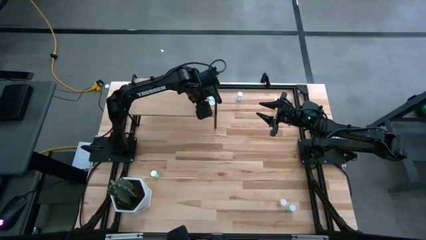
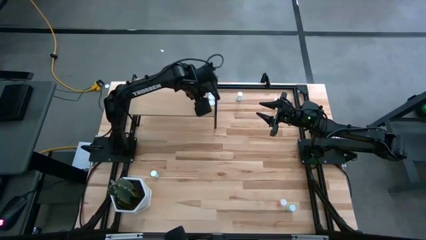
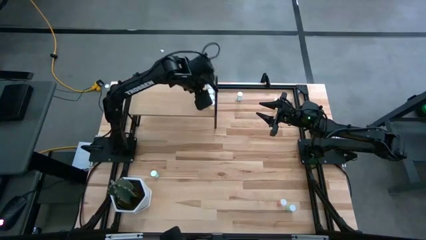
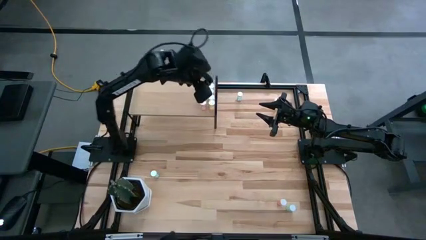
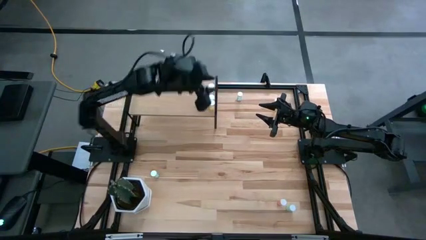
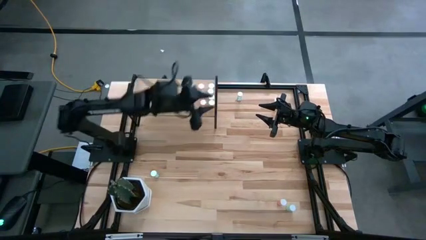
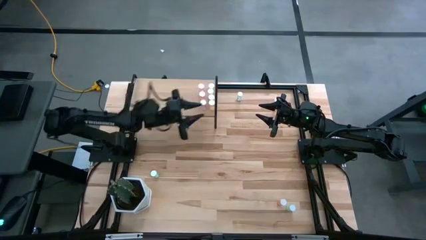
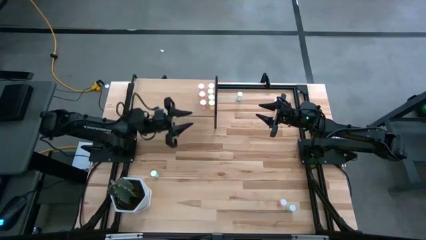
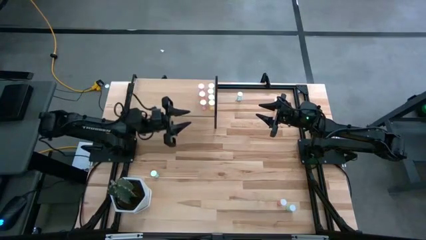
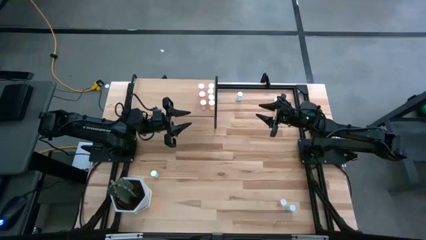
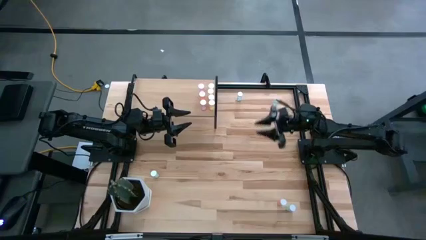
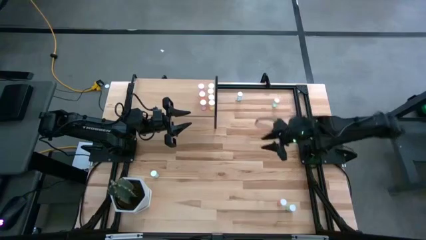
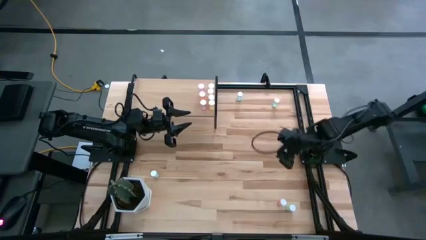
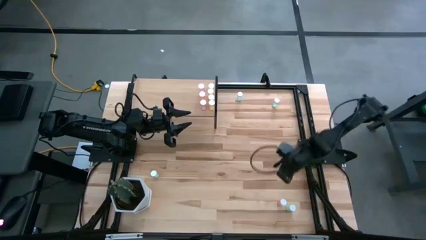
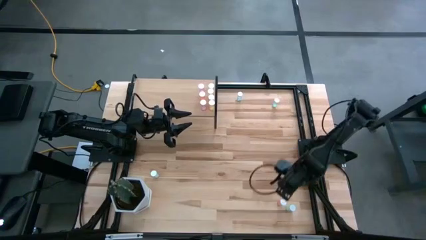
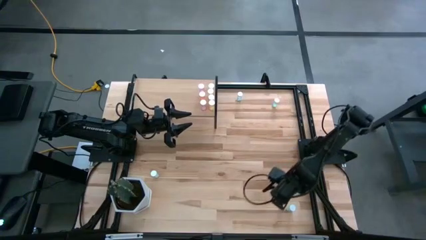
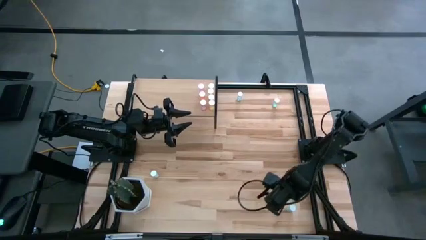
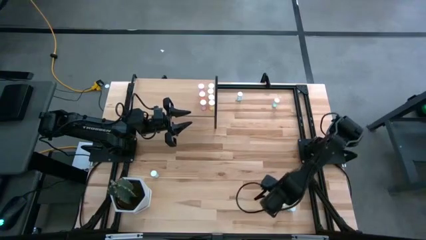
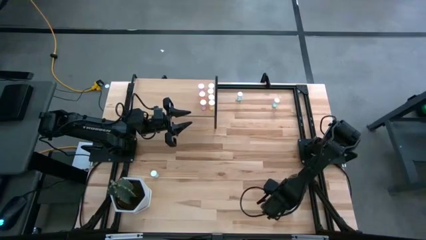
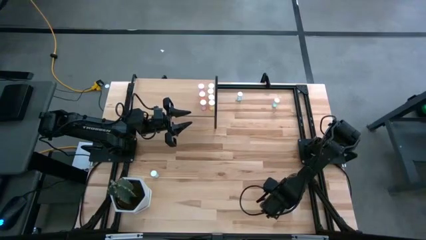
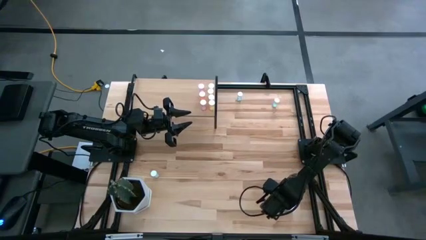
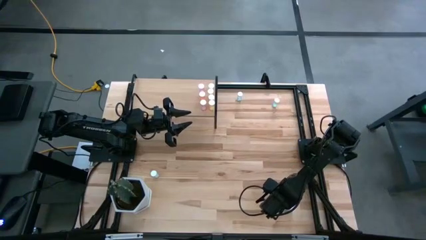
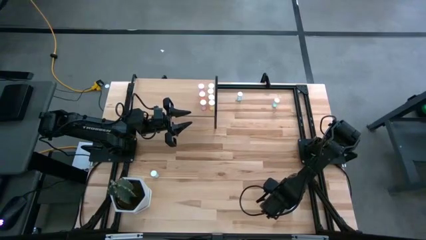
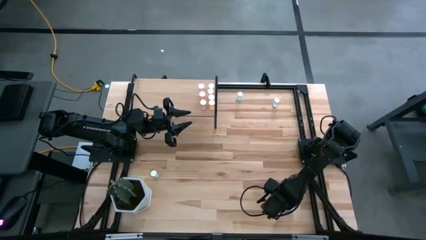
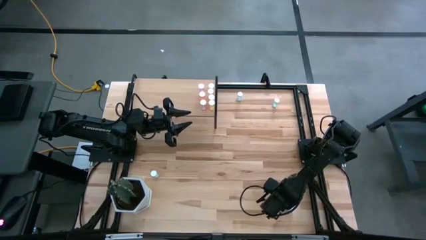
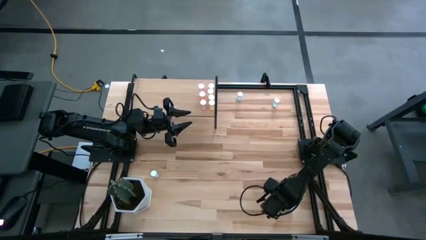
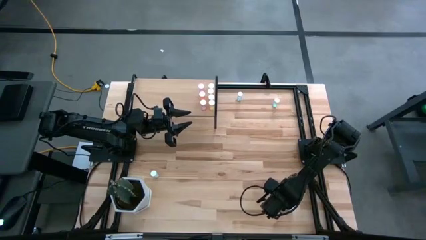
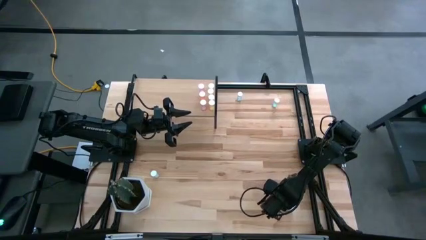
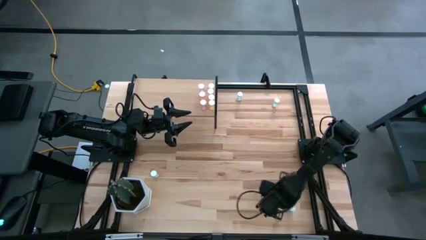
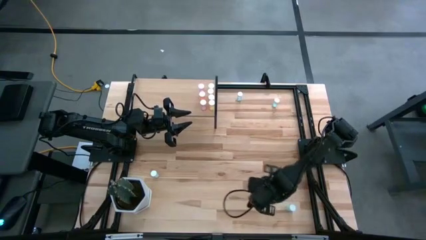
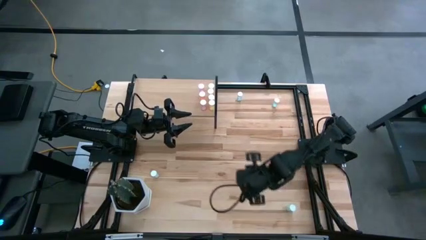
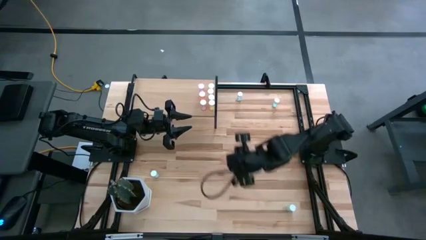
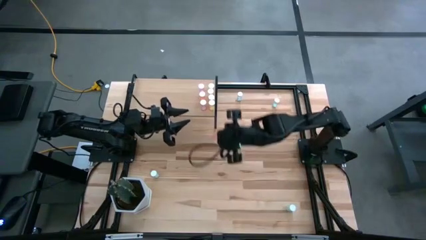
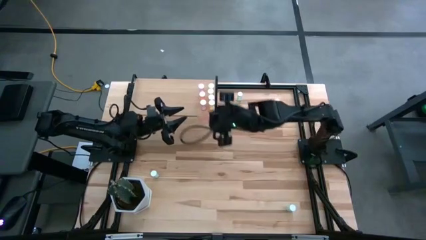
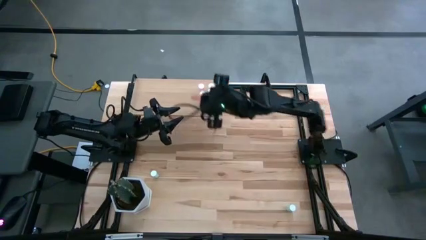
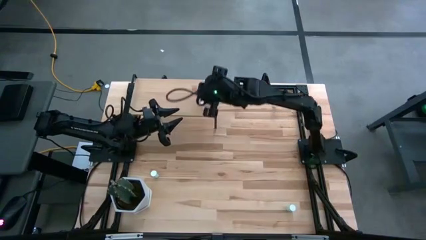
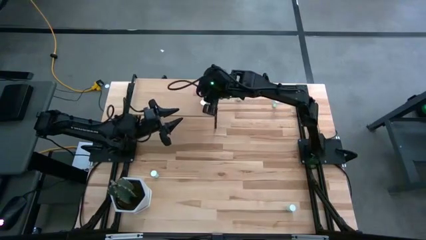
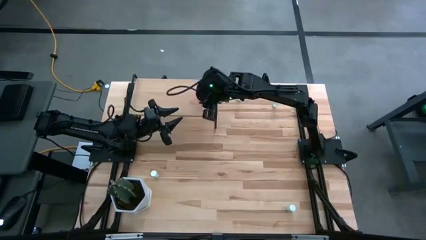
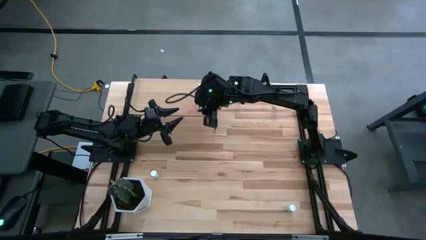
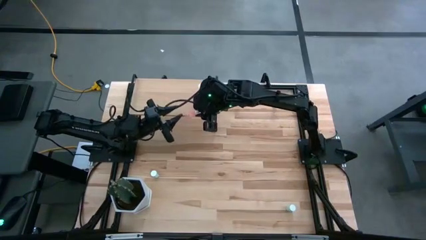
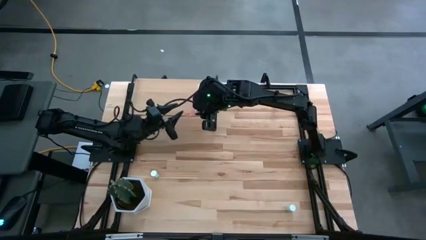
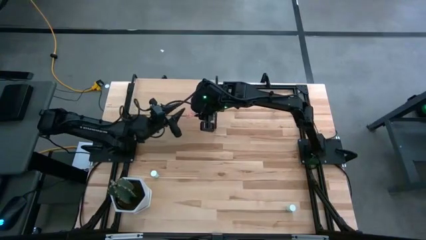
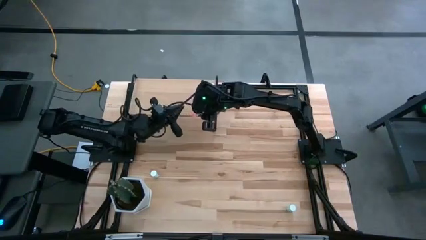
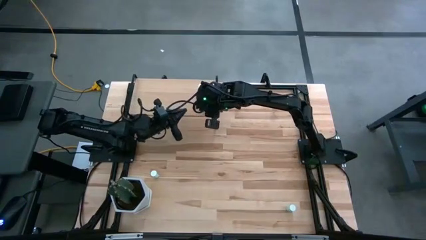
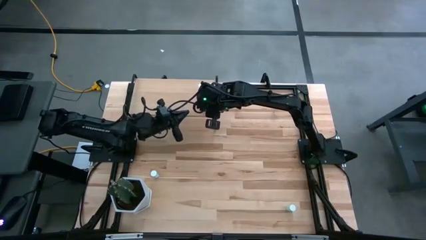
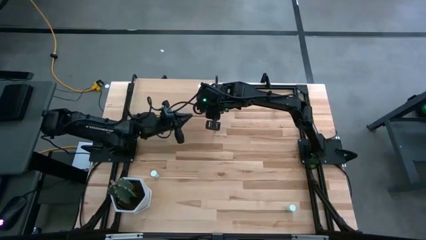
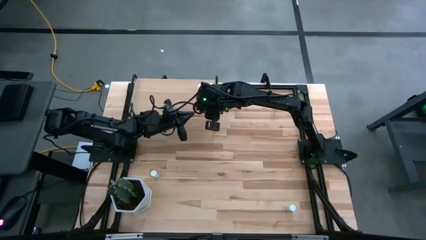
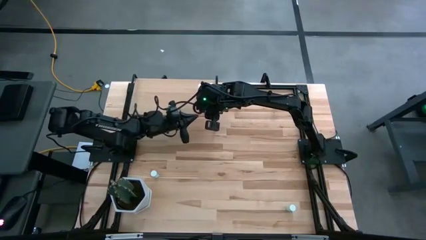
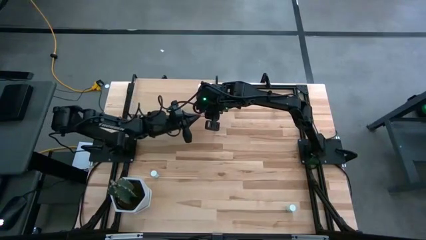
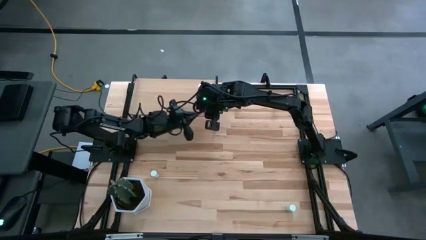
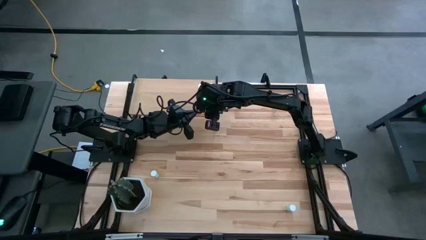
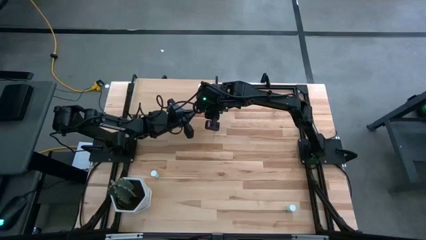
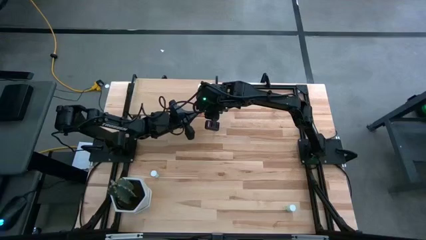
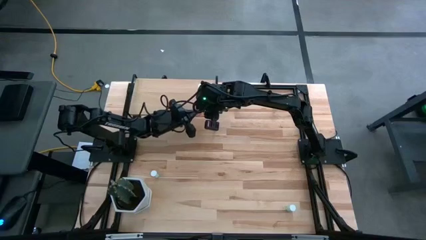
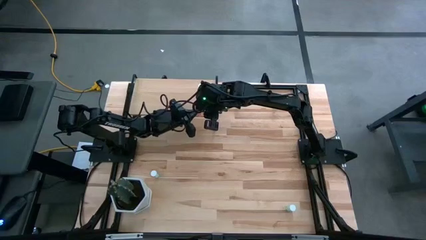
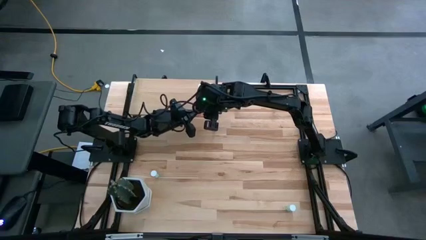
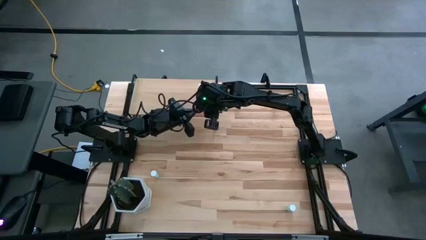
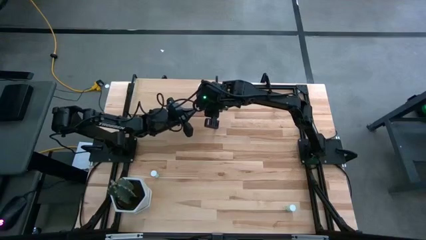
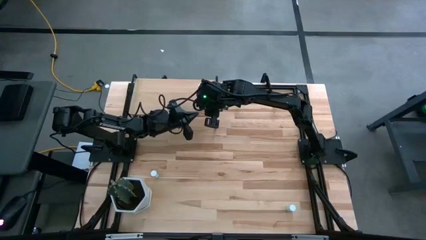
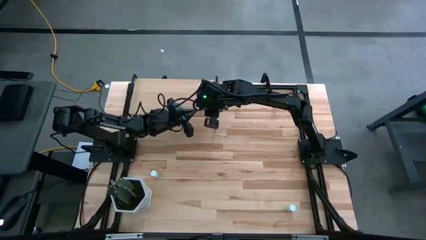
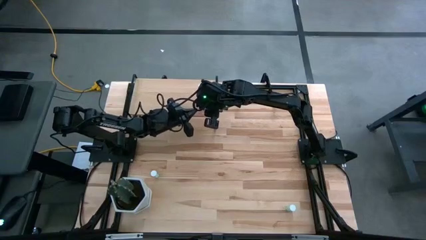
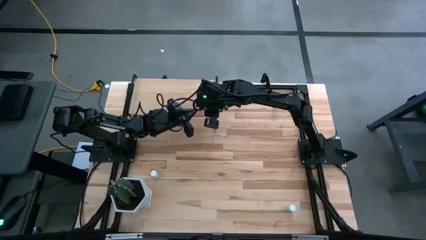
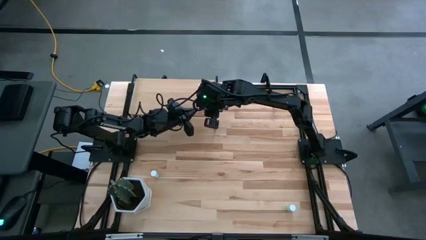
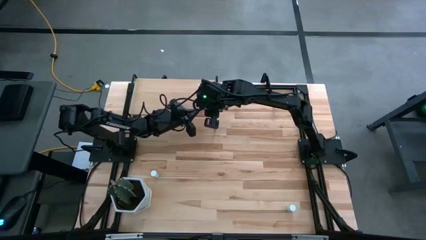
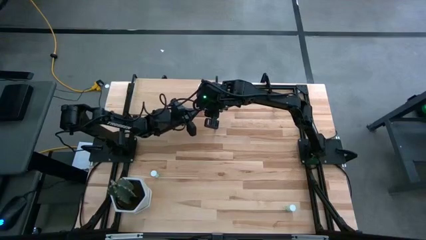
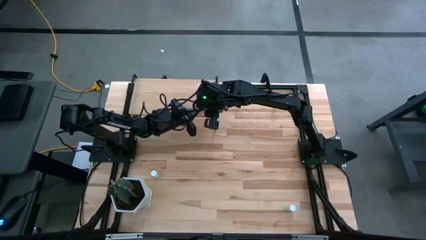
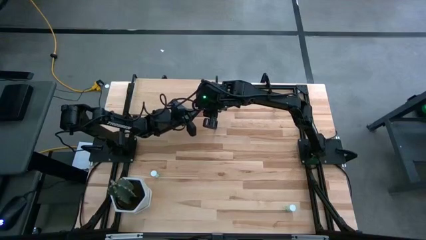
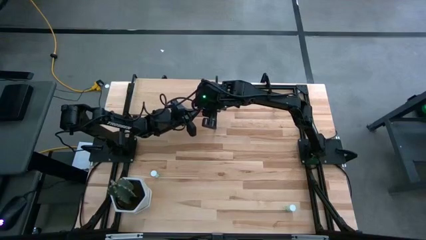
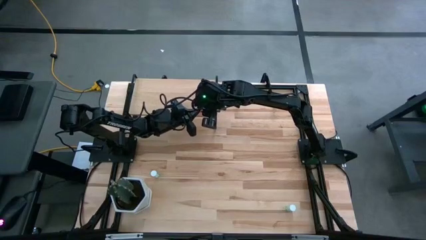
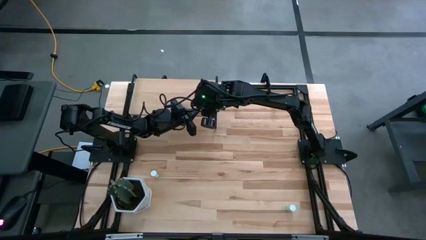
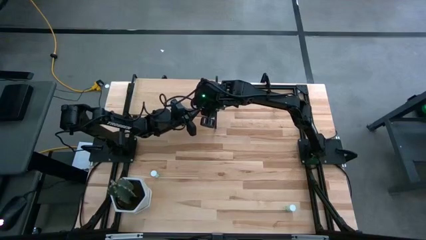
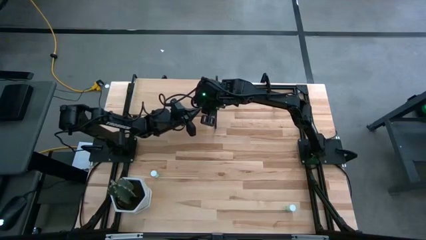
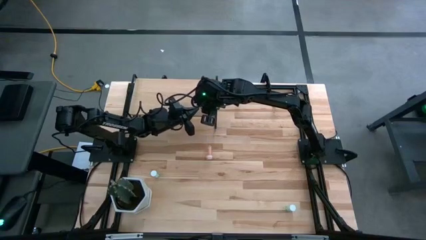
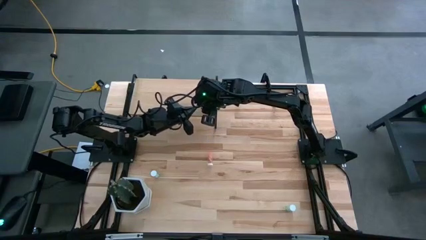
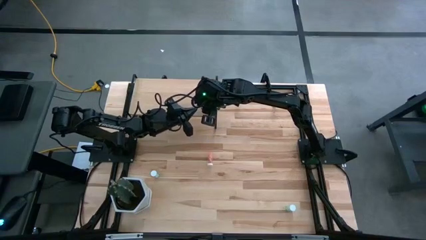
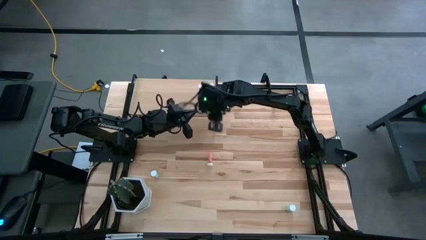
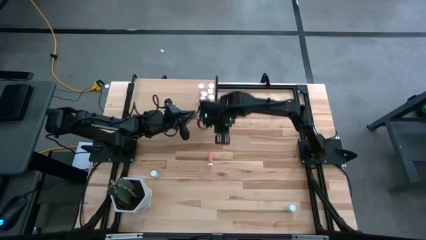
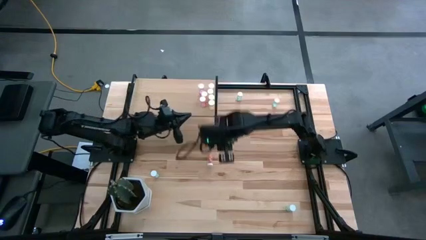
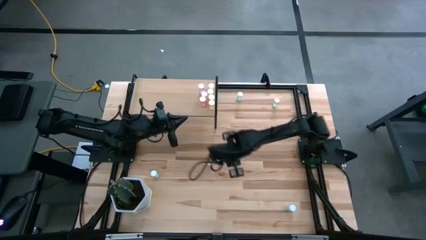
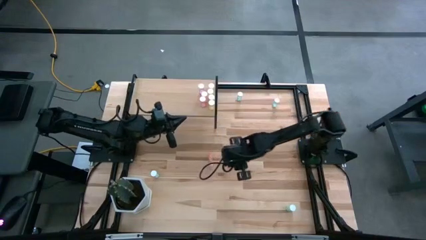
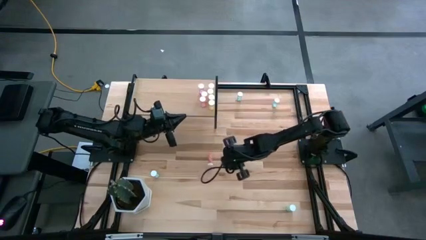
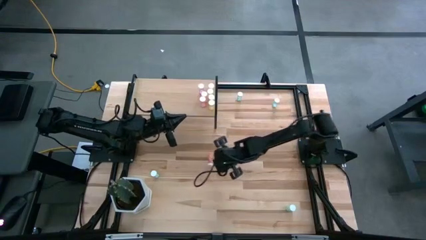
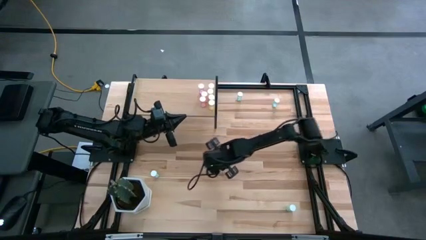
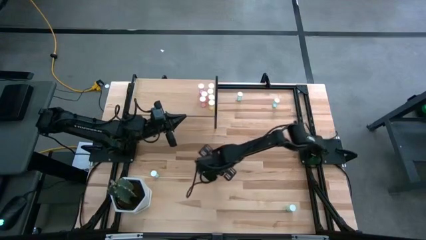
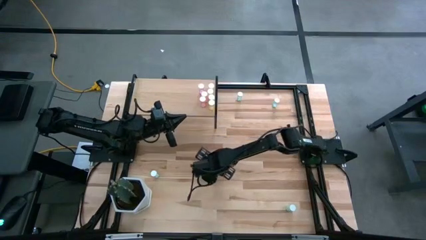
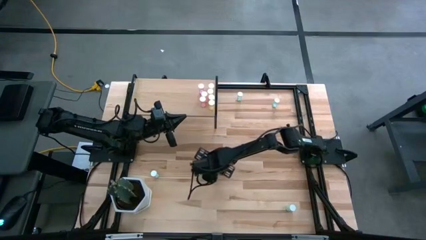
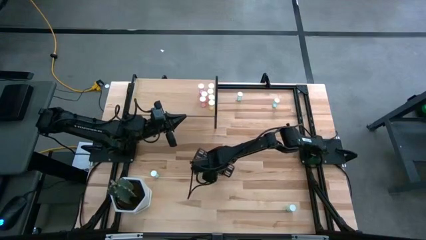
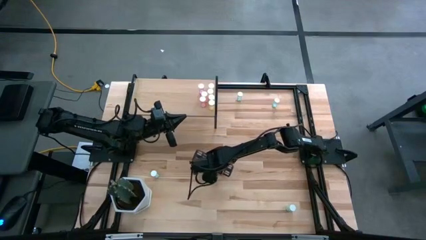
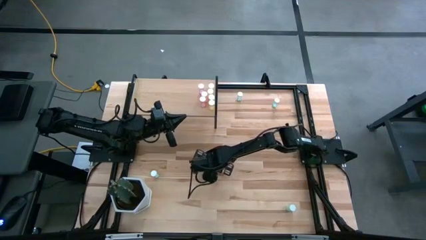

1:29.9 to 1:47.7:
Task: Pick and place medicine bottles onto shelf by color
Put the orange pill bottle on the shelf
